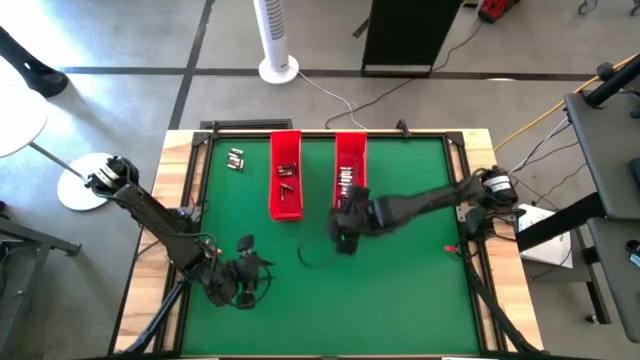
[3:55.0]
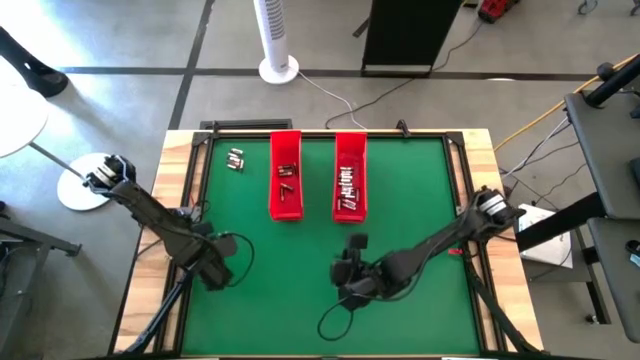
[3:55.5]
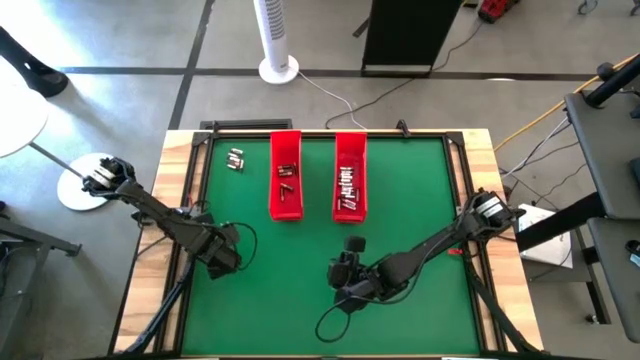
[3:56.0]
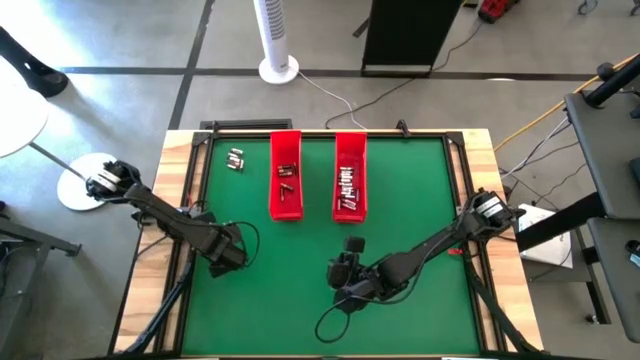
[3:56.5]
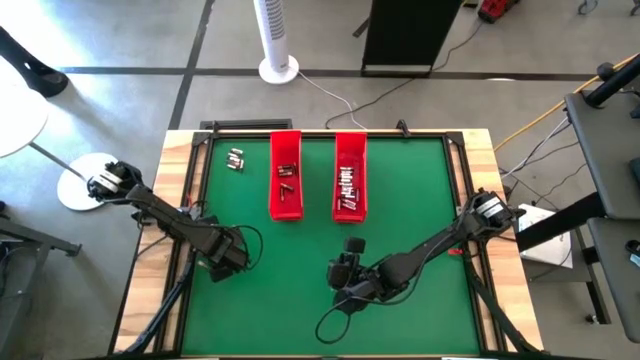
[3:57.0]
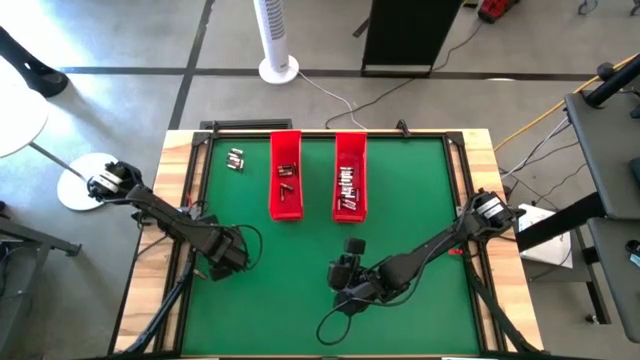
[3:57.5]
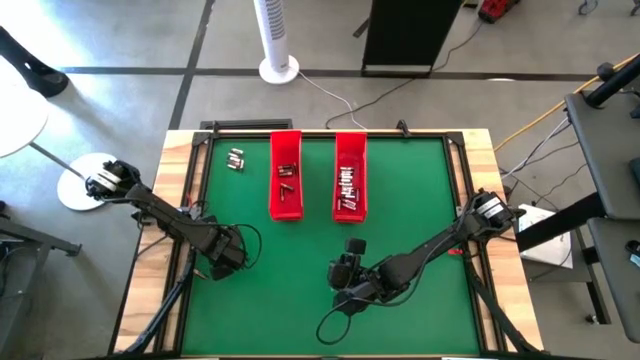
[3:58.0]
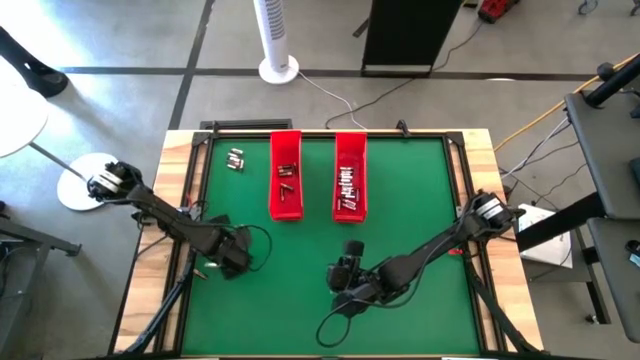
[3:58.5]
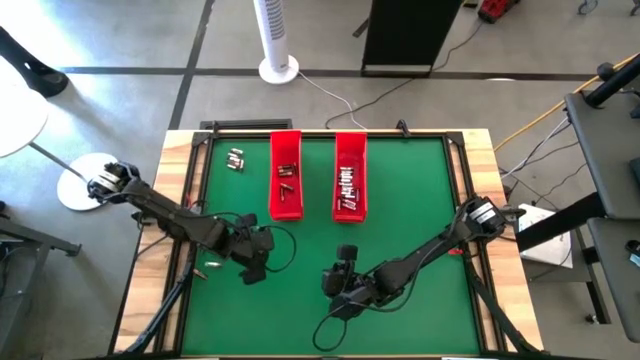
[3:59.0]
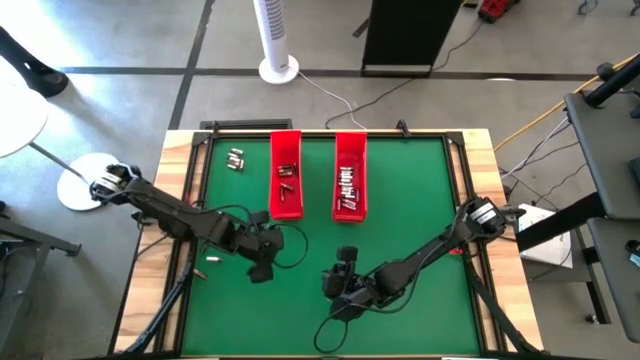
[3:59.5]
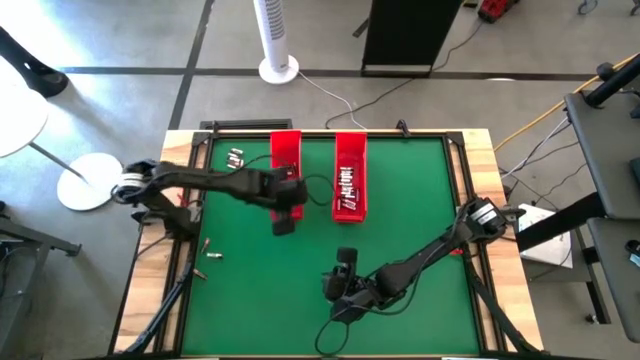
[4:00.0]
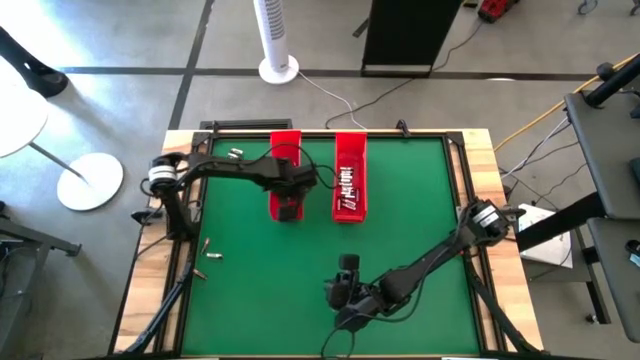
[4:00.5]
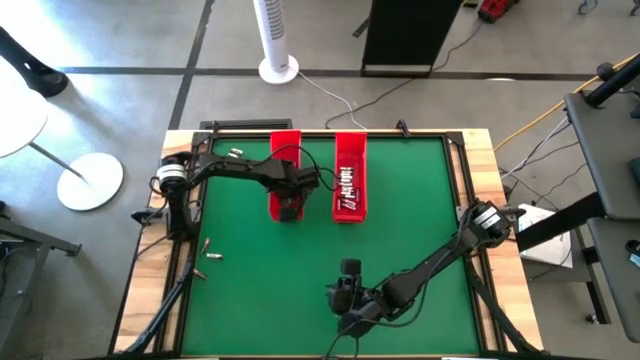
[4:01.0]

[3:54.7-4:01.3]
Task: Sort batteries
Put the black battery into the left red bin

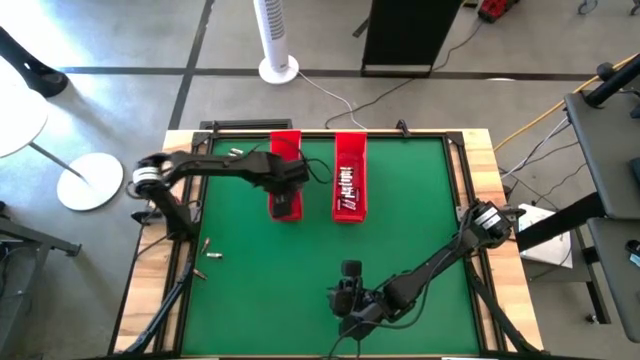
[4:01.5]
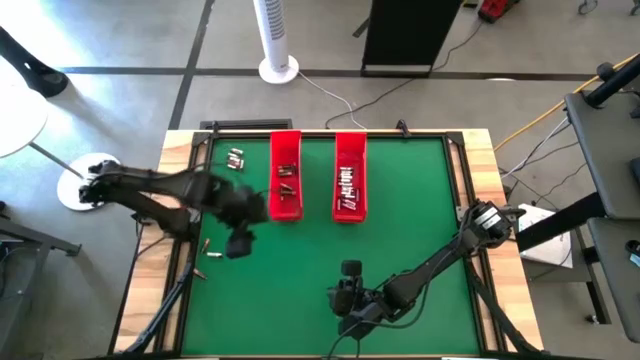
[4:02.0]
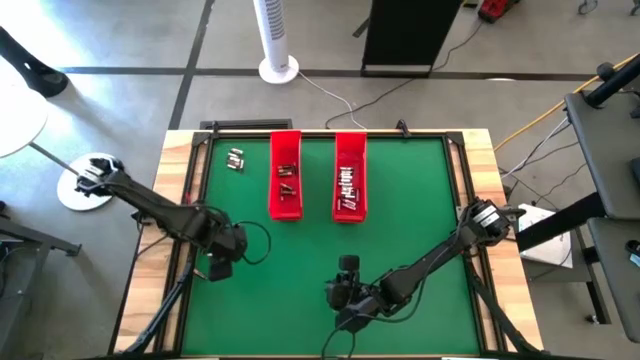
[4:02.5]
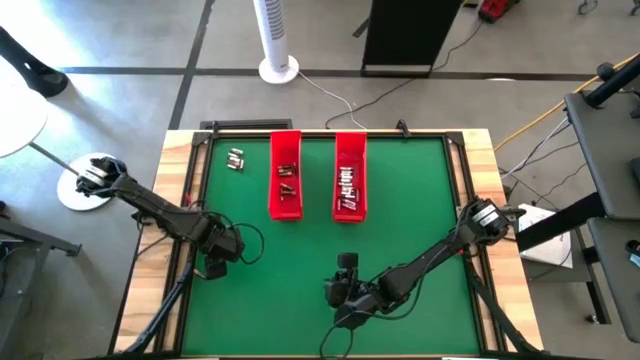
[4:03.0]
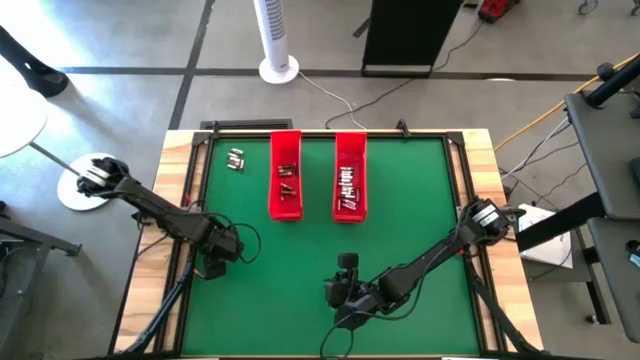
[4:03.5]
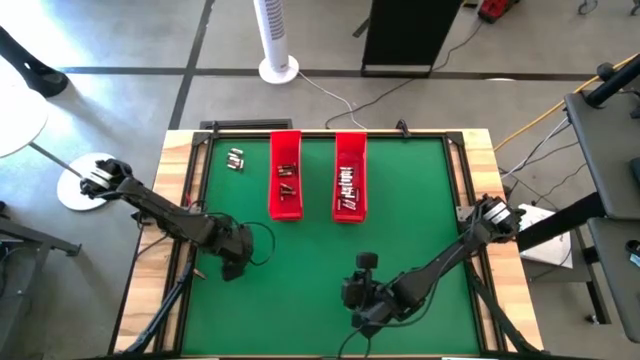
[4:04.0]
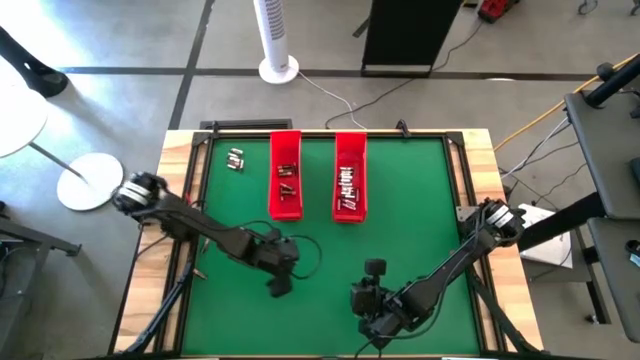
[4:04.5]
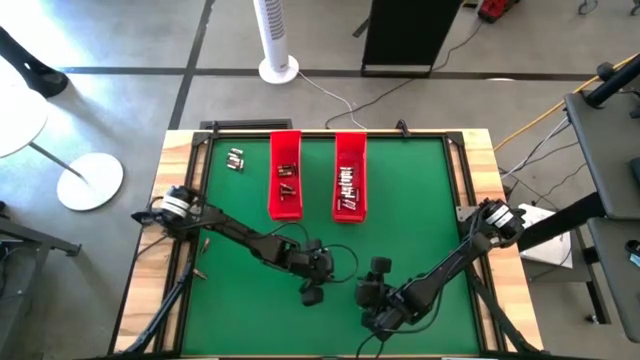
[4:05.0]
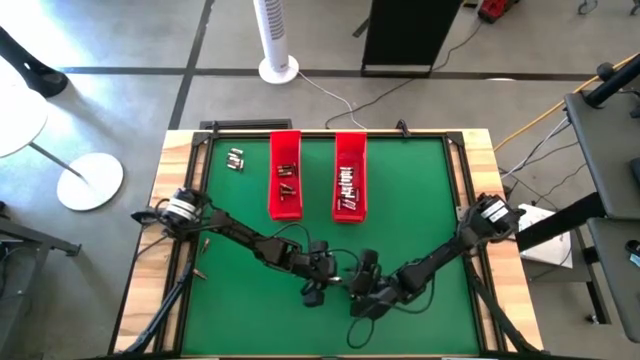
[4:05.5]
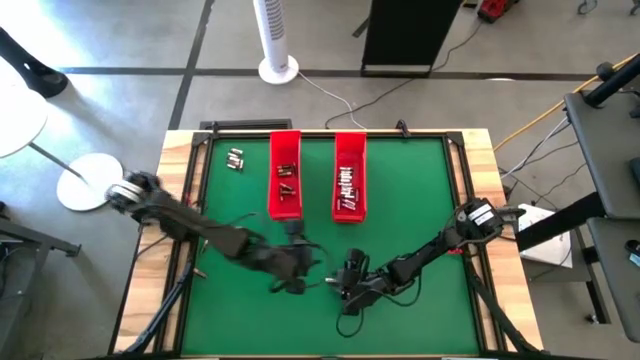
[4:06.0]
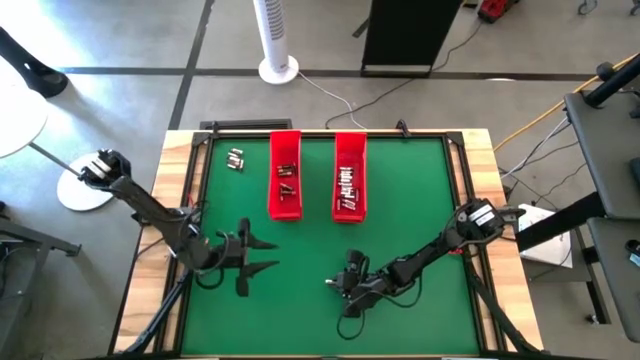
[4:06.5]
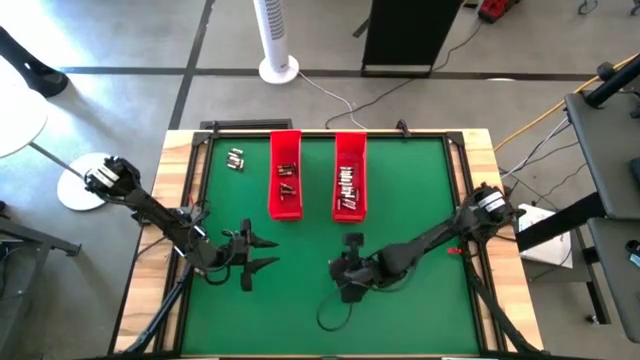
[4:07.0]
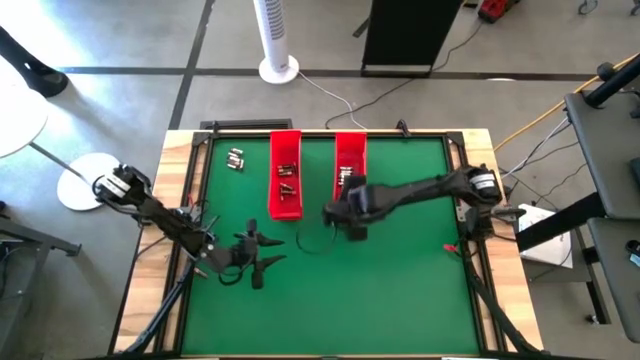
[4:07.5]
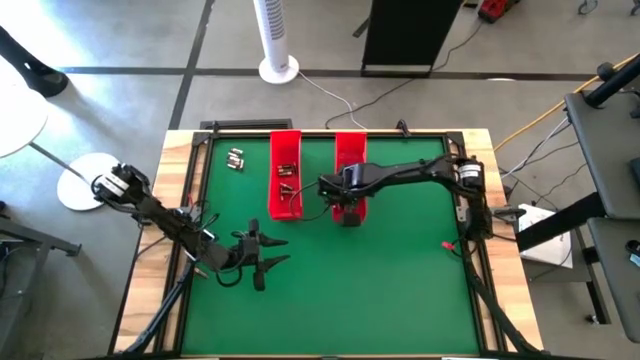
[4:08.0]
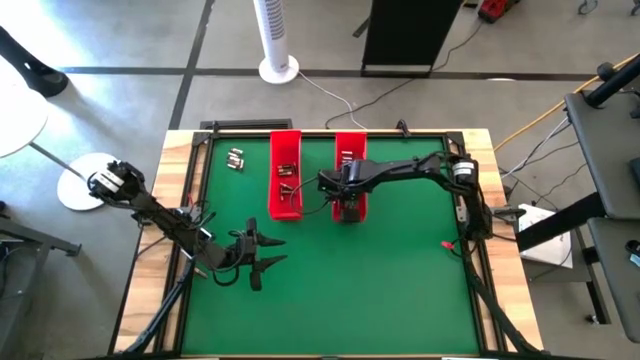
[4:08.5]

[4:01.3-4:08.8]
Put the silver battery into the right red bin

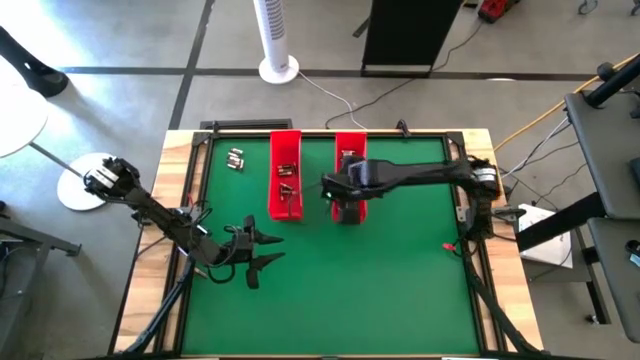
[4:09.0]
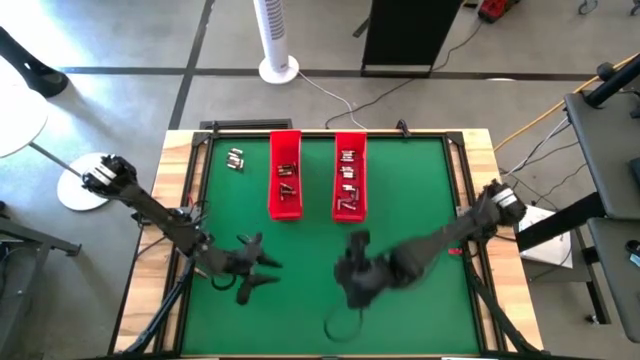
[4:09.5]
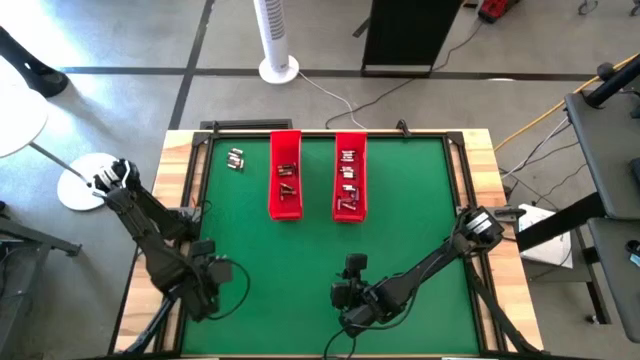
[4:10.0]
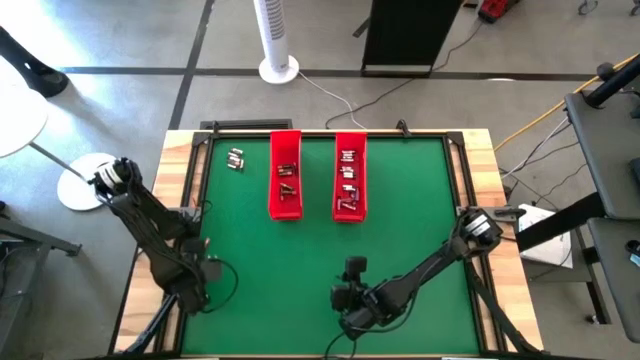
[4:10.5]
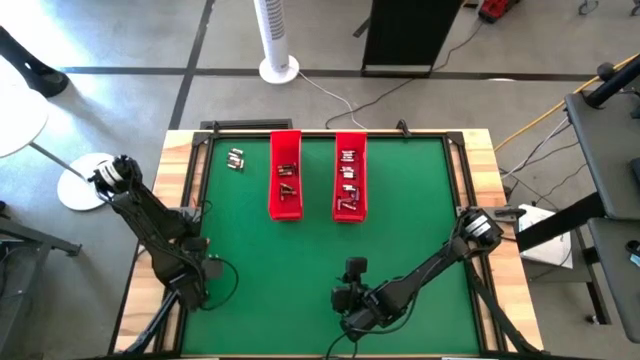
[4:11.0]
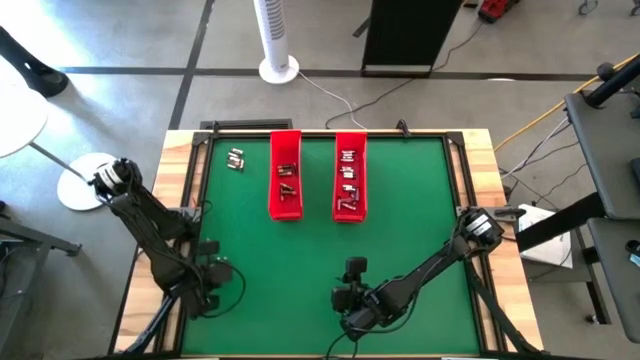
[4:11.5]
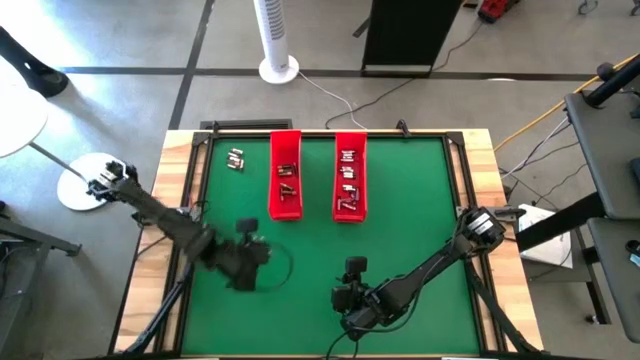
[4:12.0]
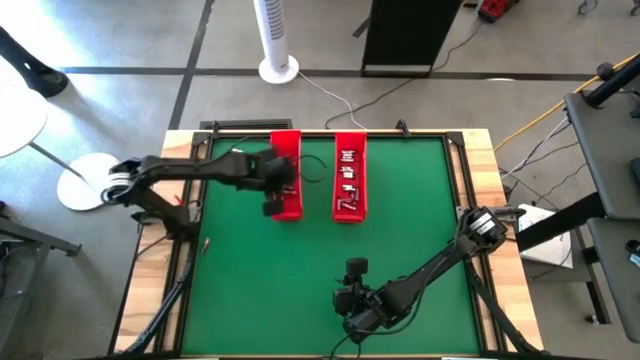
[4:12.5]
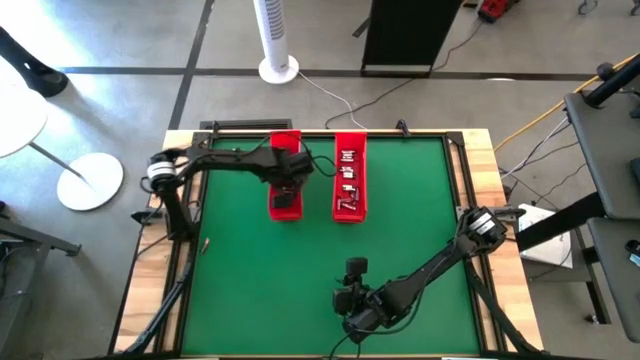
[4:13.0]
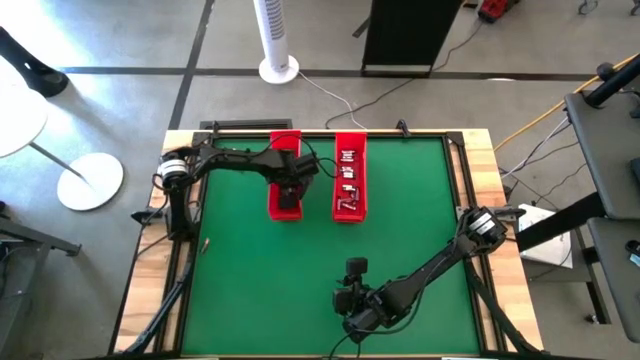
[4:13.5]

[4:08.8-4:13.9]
Put the black battery into the left red bin

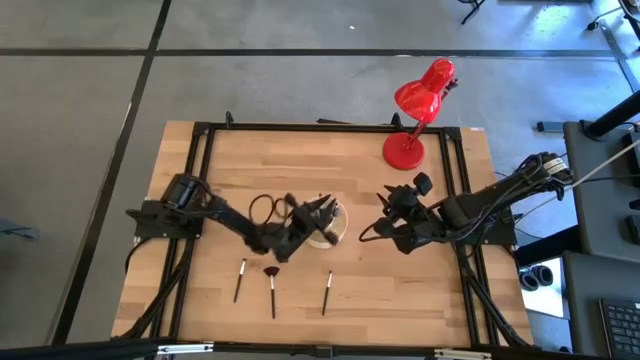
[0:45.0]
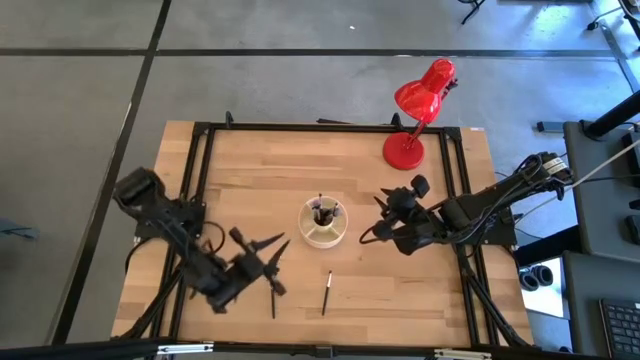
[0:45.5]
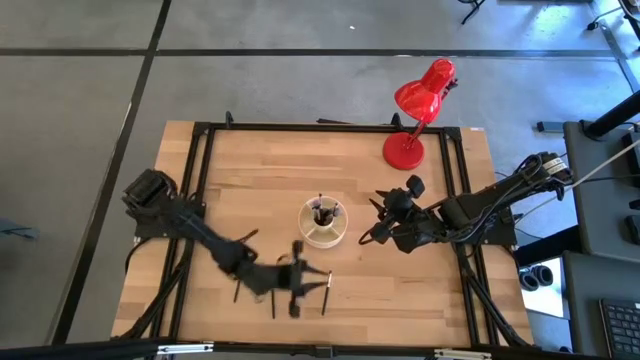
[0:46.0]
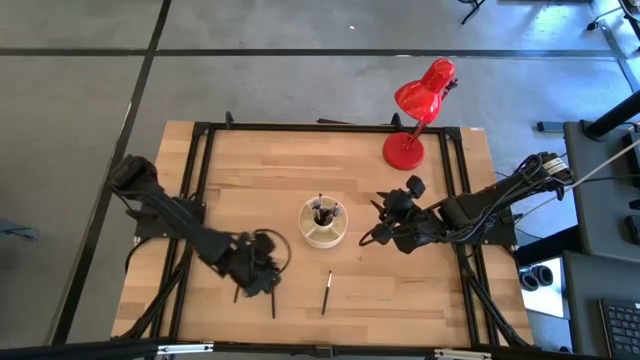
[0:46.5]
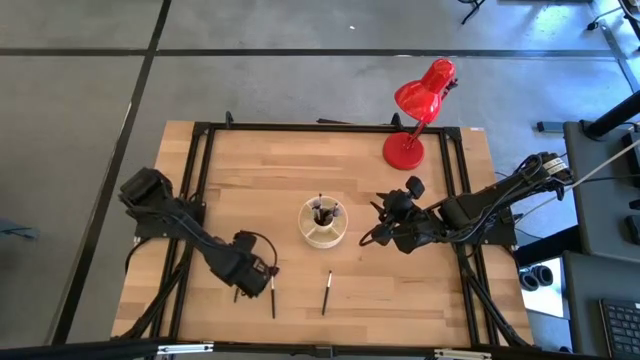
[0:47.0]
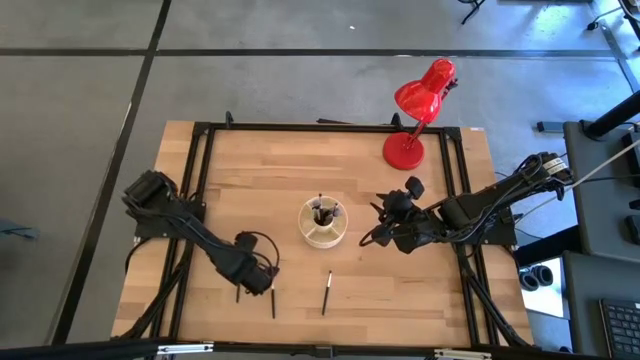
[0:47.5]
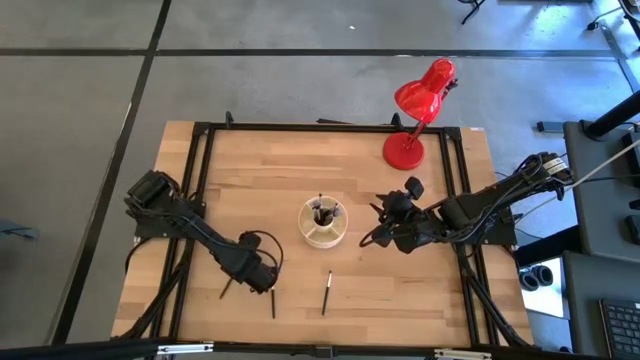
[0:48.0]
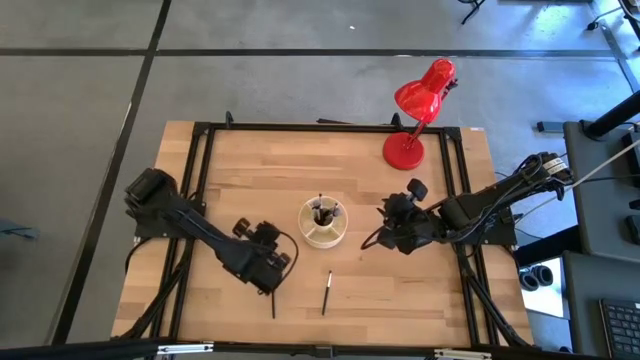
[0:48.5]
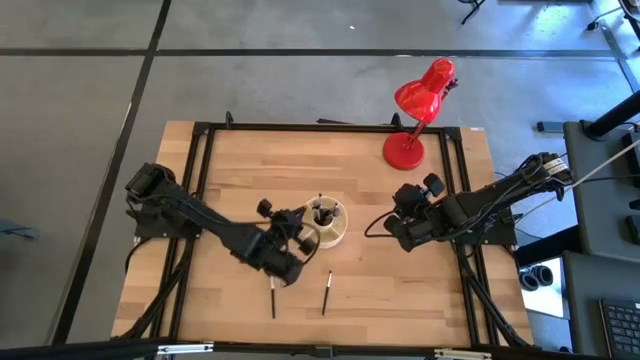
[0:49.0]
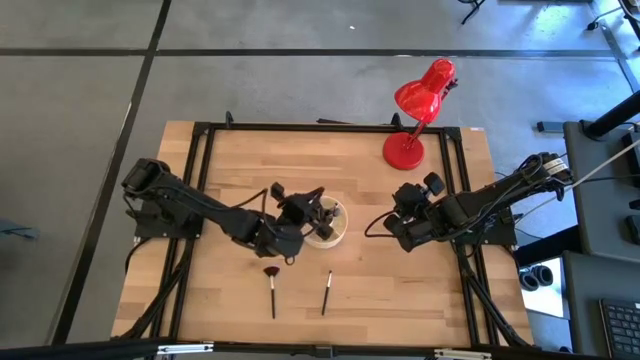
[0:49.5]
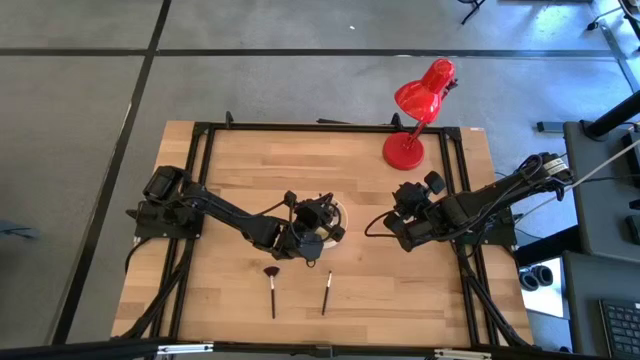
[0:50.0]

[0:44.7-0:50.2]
Task: Put items in baskets/containers
Put the black eyeshadow brush into the white brush holder
